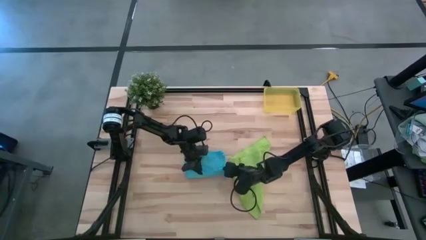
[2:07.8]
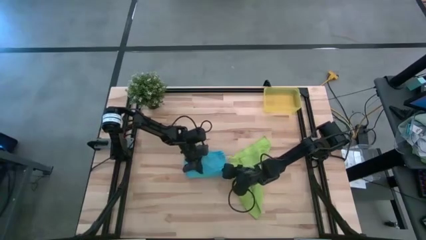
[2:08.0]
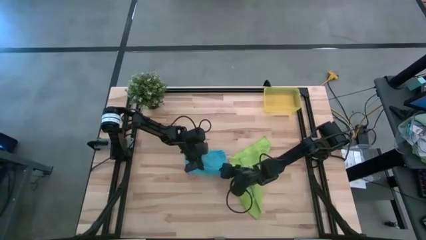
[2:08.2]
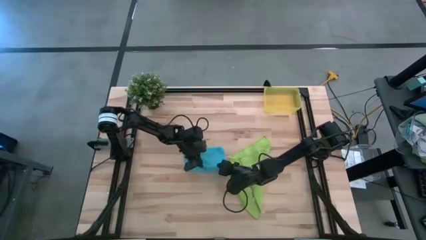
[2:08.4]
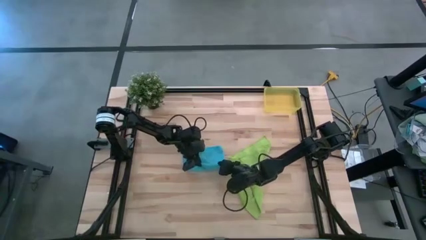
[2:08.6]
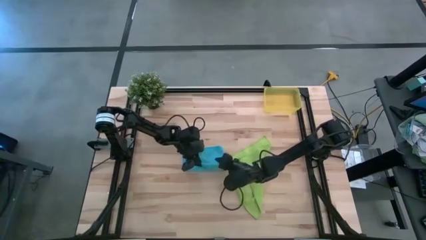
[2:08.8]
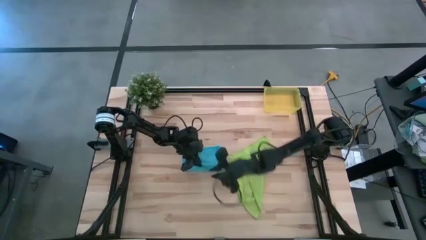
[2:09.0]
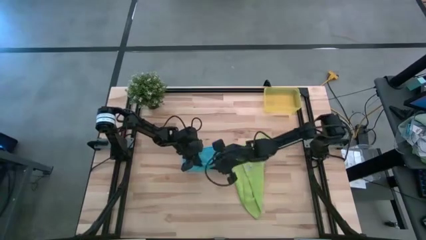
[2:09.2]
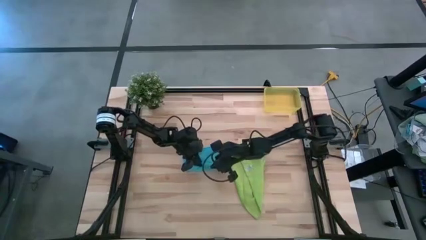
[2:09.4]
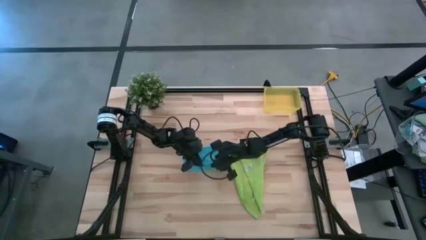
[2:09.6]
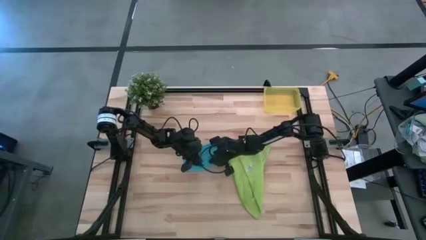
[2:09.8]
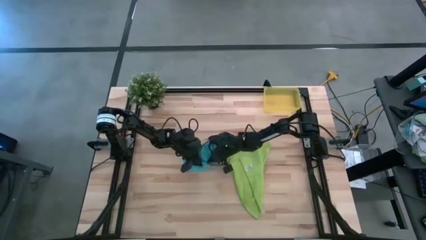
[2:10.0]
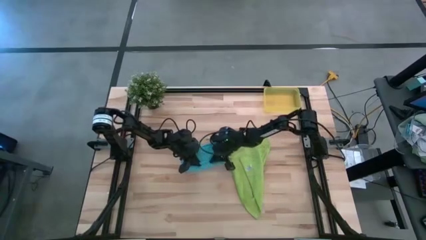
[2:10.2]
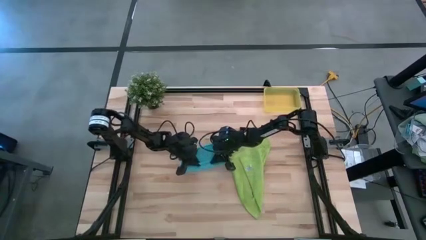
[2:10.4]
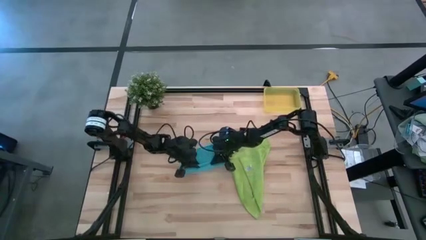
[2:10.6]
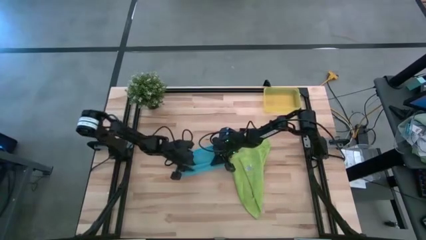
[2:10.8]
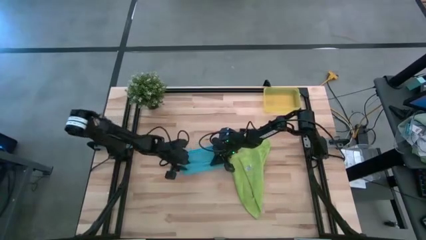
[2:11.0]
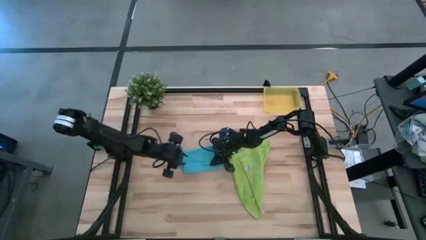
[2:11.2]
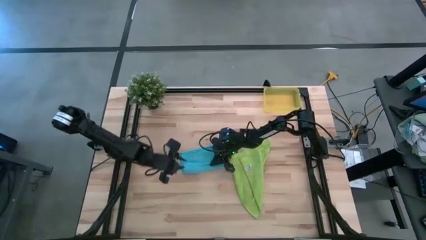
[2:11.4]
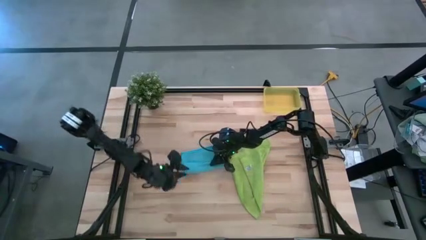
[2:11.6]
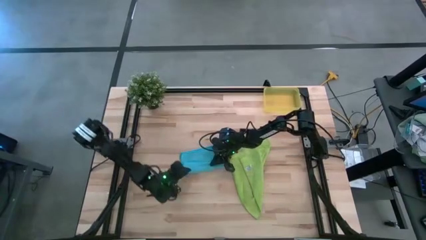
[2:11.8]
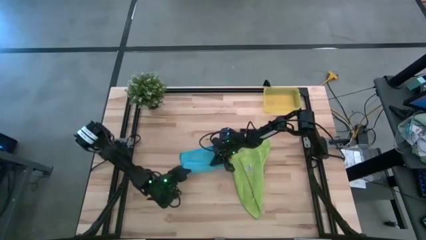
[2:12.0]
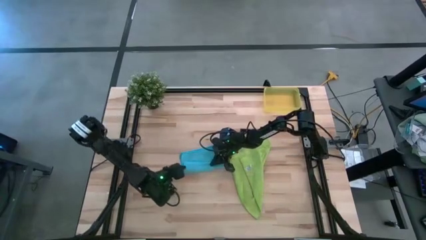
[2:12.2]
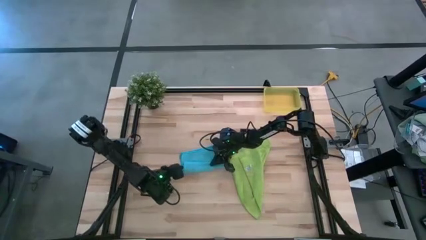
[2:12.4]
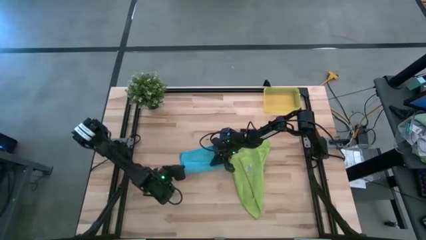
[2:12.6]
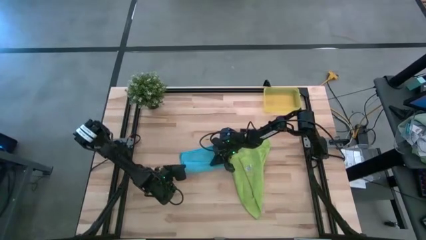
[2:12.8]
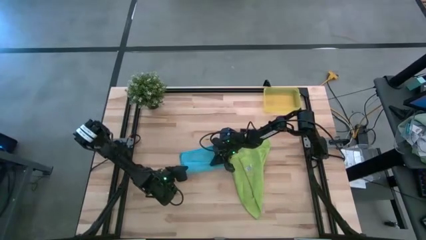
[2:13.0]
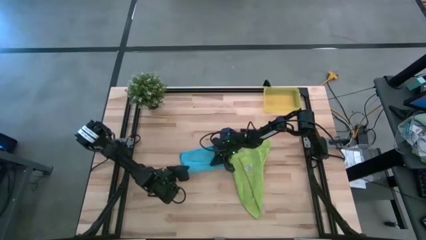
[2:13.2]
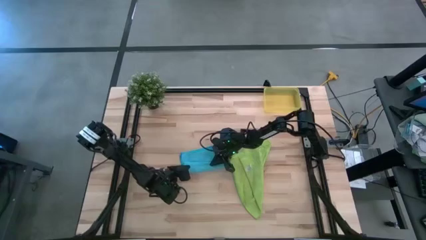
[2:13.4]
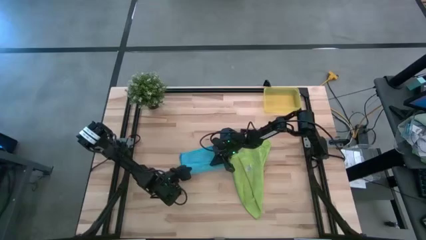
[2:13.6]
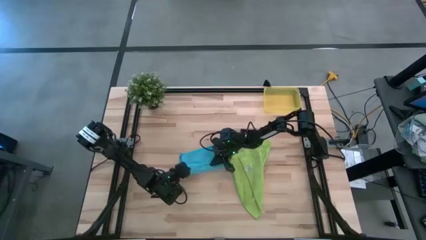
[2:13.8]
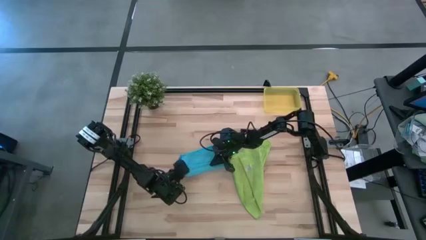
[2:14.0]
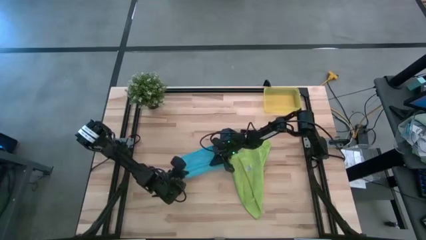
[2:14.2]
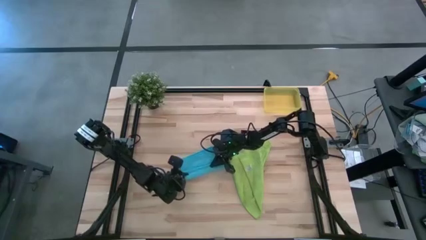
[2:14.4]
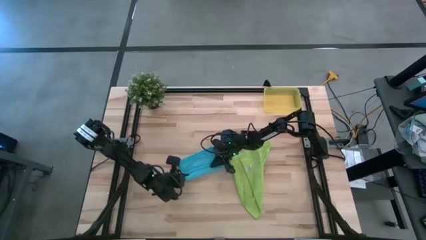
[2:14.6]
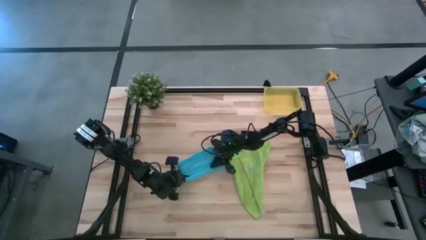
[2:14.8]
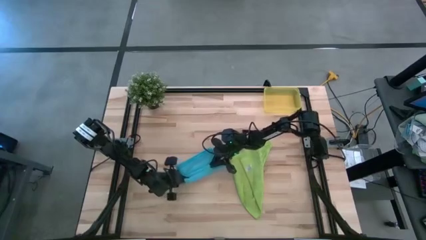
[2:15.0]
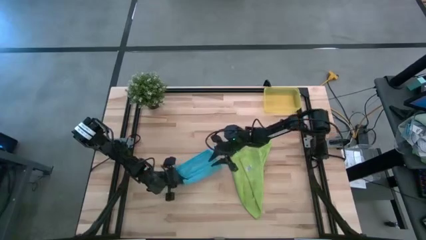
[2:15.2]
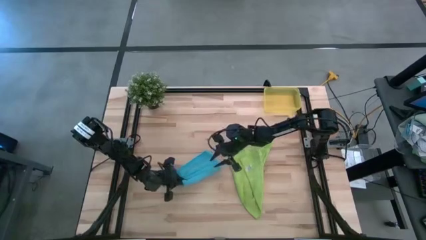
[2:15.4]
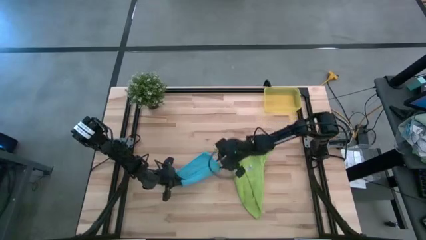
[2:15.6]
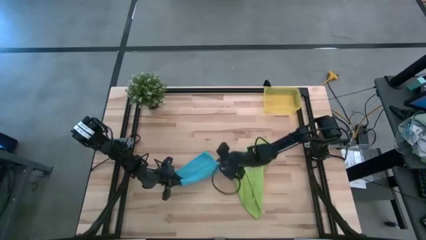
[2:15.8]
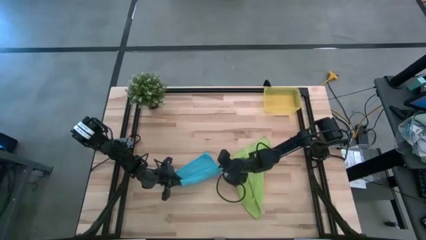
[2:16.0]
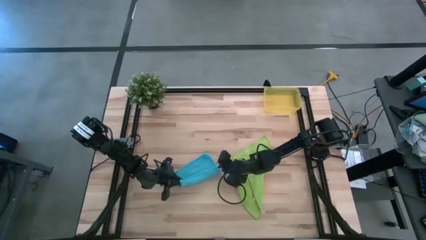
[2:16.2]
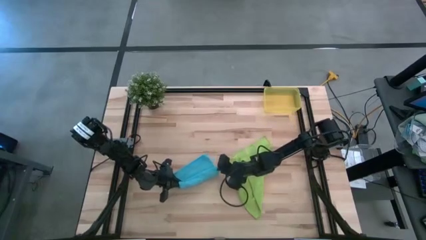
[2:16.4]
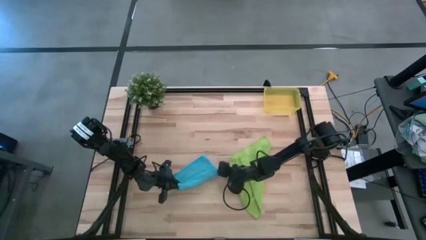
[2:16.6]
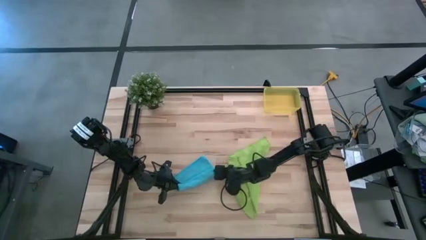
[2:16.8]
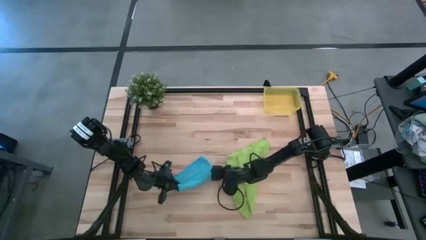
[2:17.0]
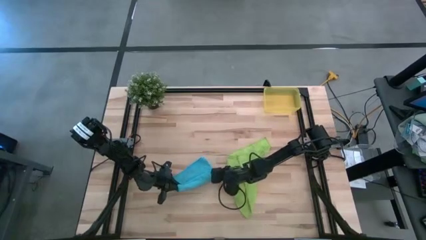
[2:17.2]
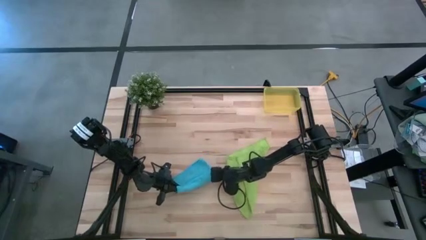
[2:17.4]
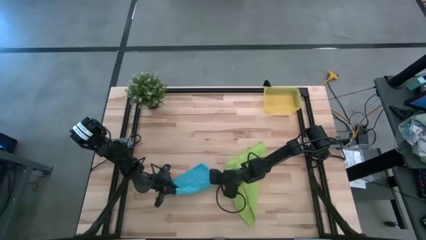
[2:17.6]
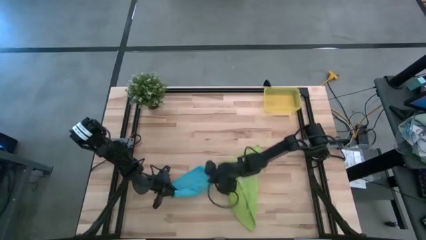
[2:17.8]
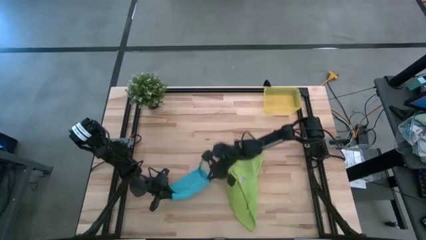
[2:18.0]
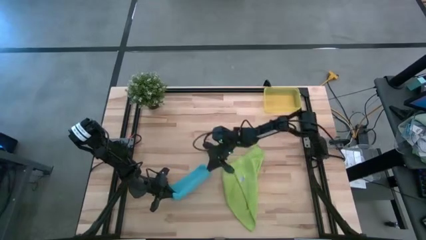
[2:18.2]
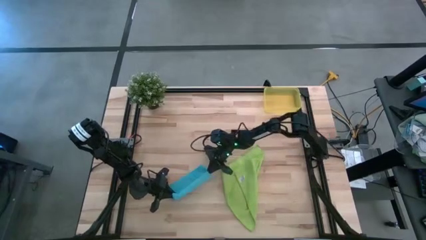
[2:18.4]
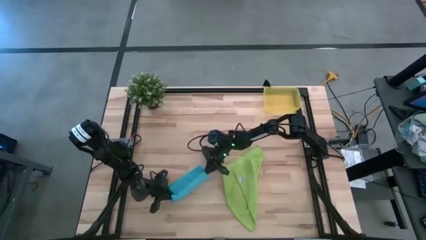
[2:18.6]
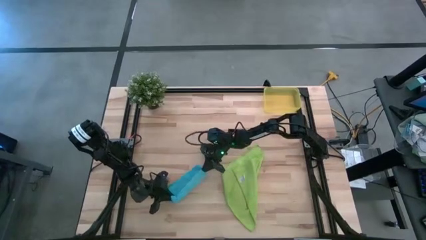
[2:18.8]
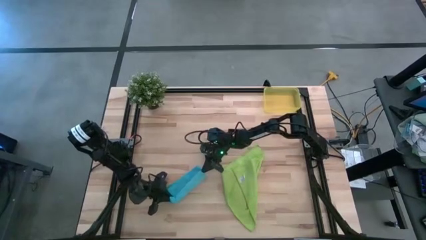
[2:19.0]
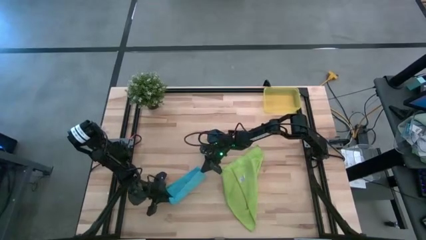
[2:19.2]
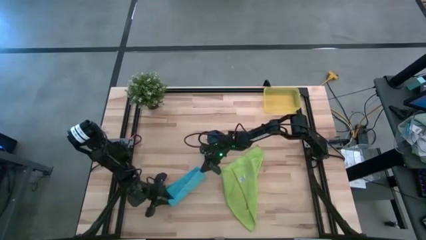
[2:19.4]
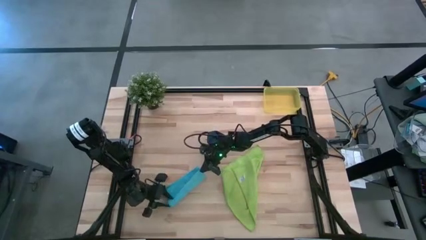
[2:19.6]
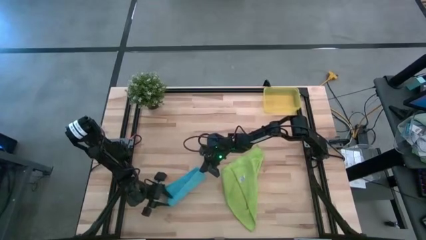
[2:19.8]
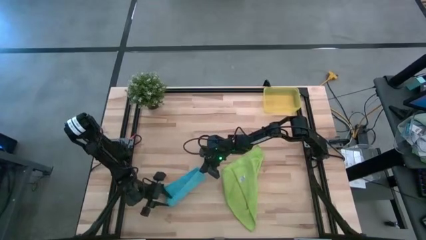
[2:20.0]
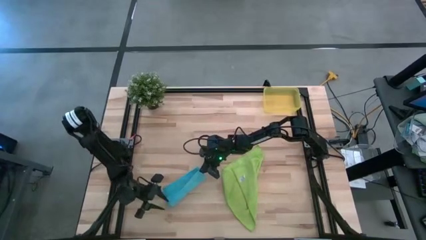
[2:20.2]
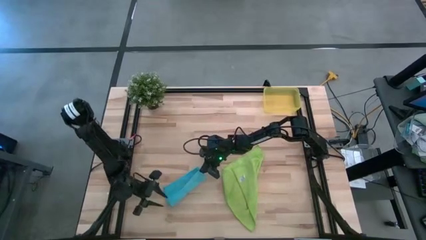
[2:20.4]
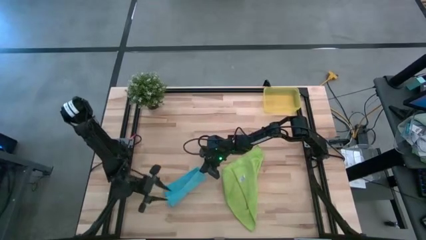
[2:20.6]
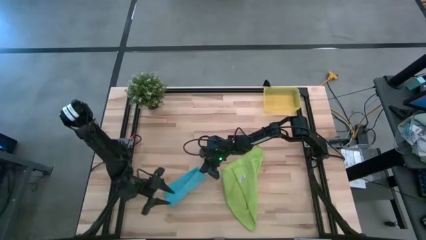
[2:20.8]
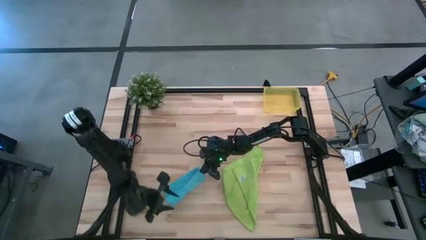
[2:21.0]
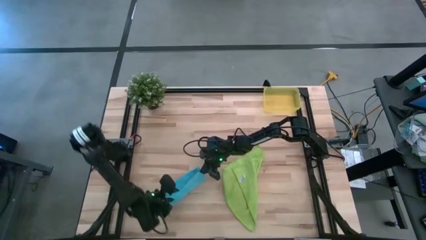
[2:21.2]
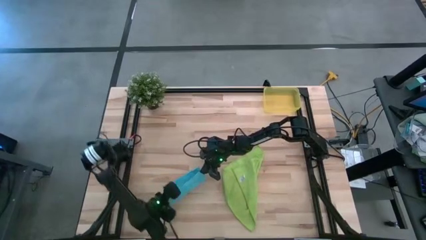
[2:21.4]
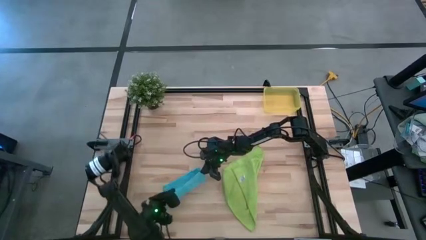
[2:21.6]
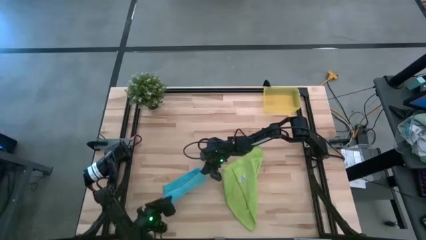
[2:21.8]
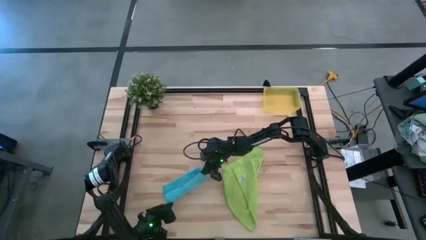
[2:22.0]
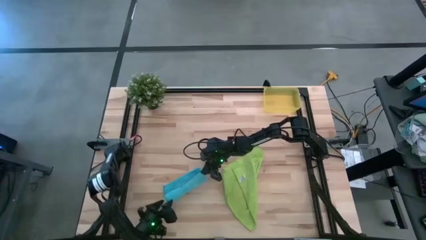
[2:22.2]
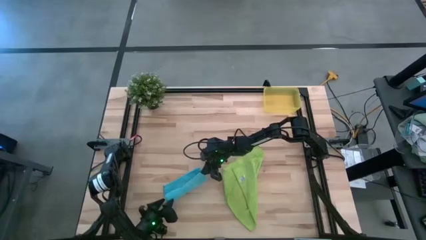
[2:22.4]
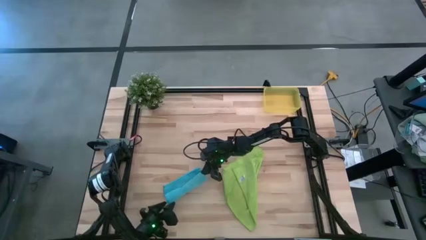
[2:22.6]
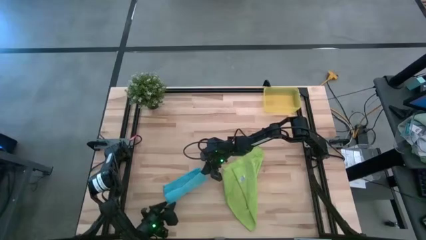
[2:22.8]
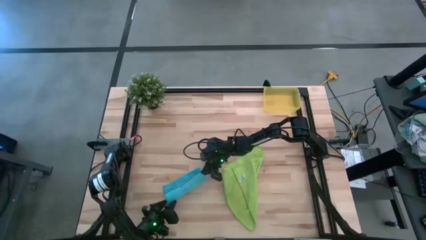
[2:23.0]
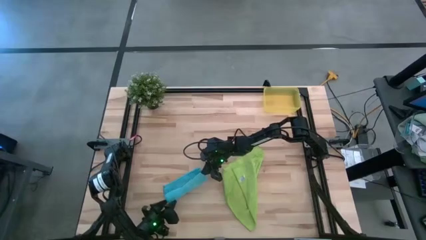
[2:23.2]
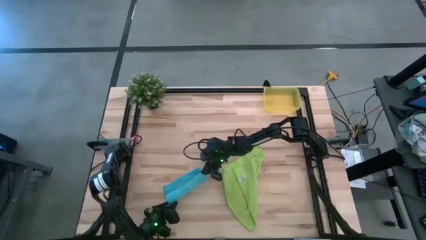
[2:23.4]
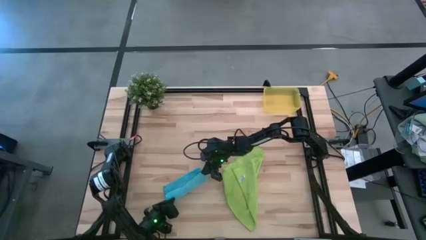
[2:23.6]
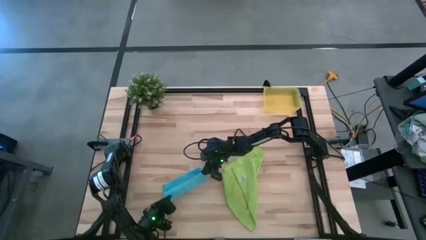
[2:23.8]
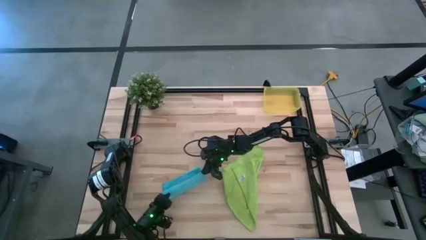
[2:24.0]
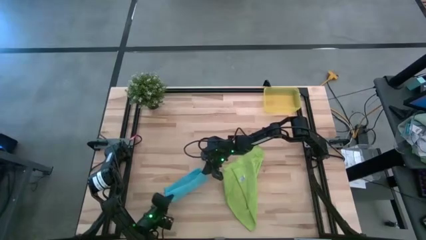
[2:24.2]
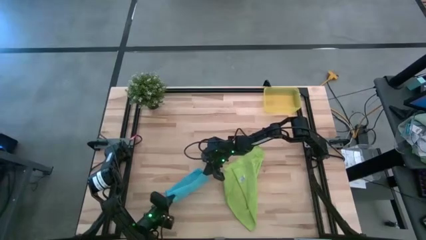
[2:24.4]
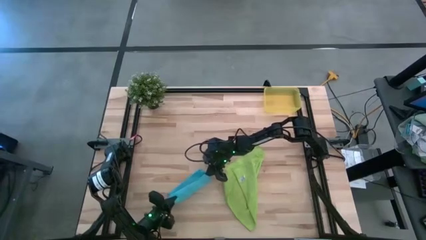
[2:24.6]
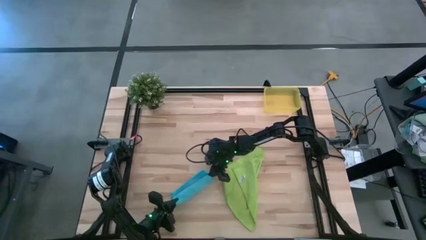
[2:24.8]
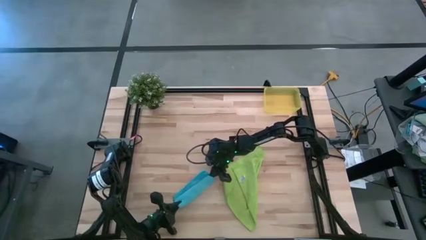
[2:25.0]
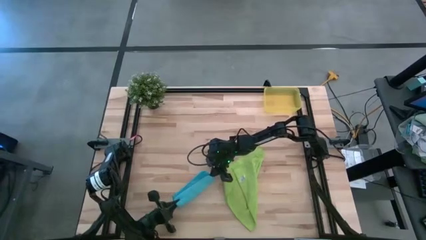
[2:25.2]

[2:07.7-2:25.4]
Task: Roll microfiber towels into tight, uniform cylinder then place into a basket
Roll the blue microfiber towel
